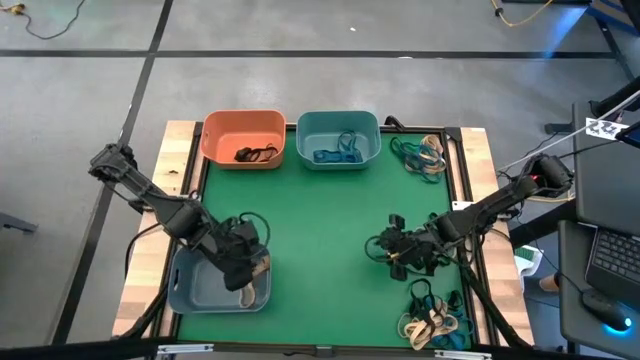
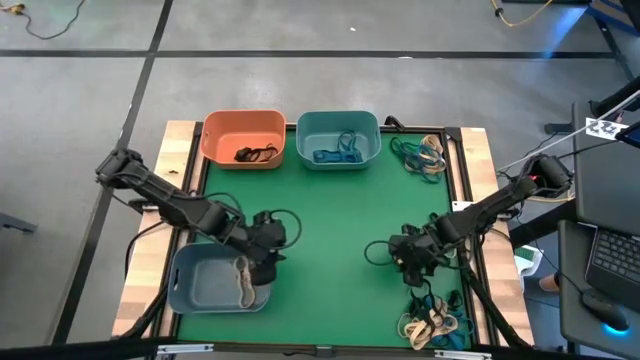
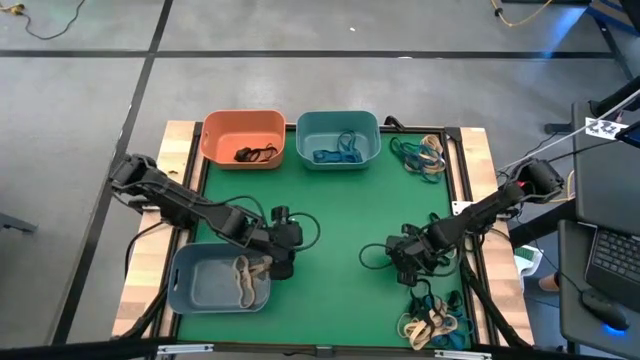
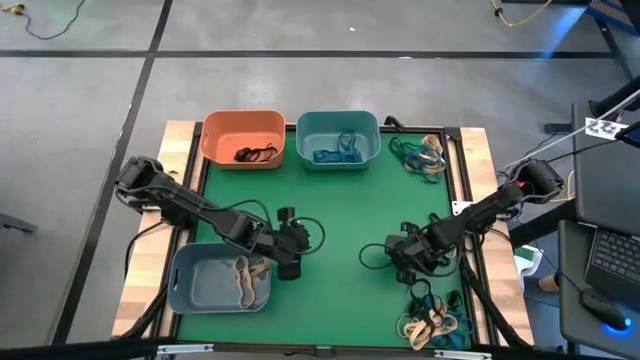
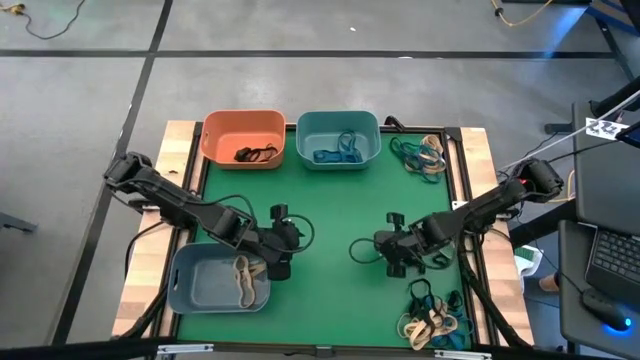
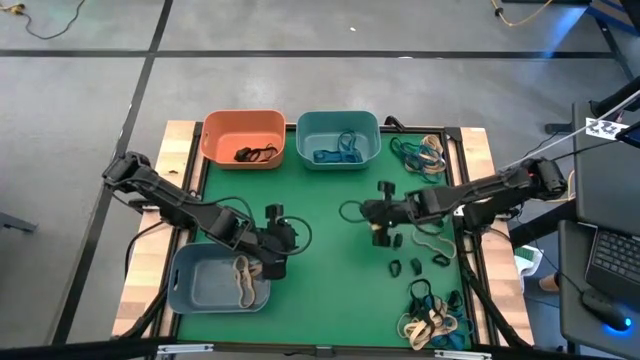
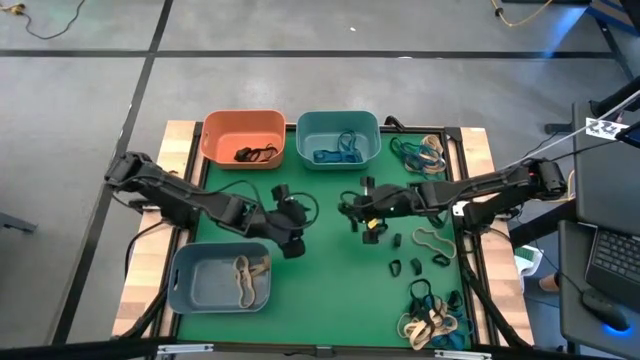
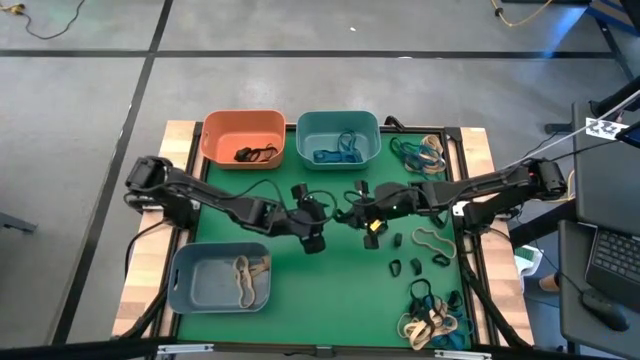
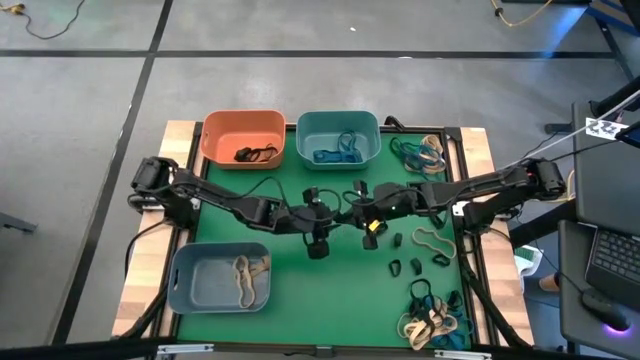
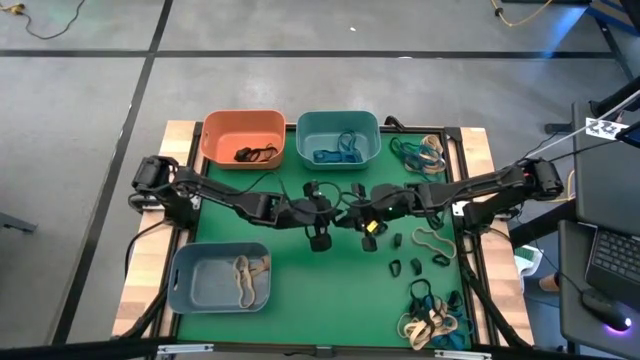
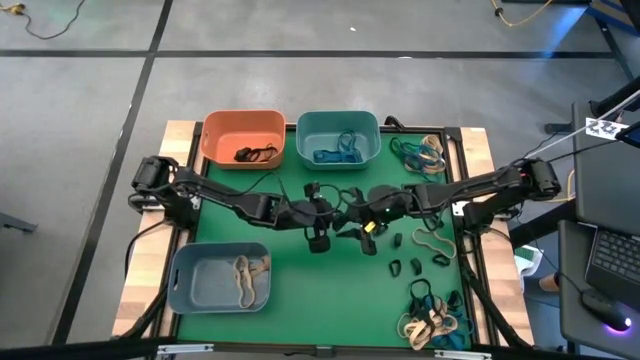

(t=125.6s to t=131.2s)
Task: Sort rubber bands into baskets
Put the black rubber band into the orange bin

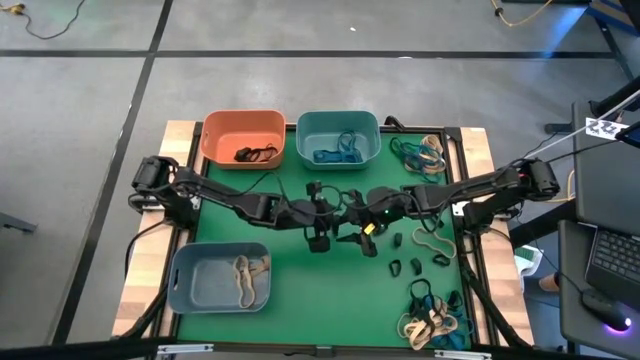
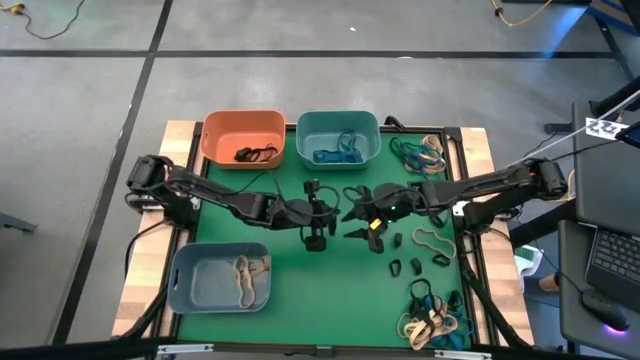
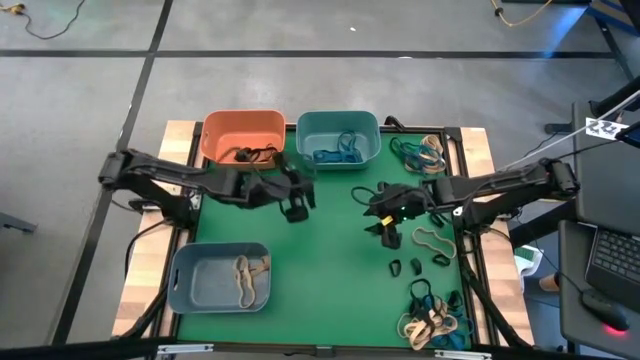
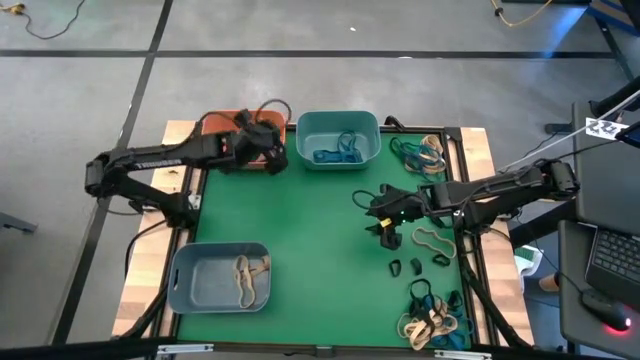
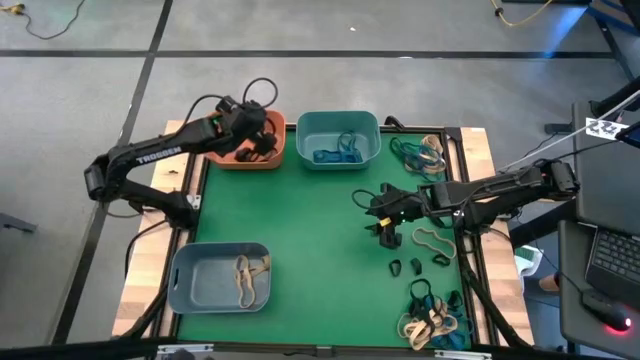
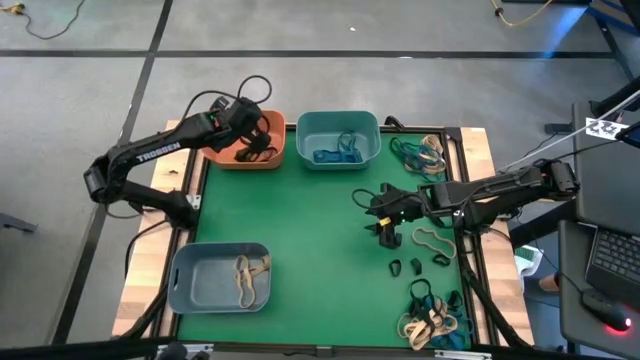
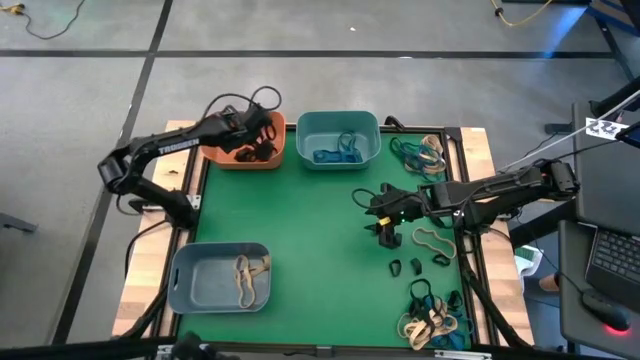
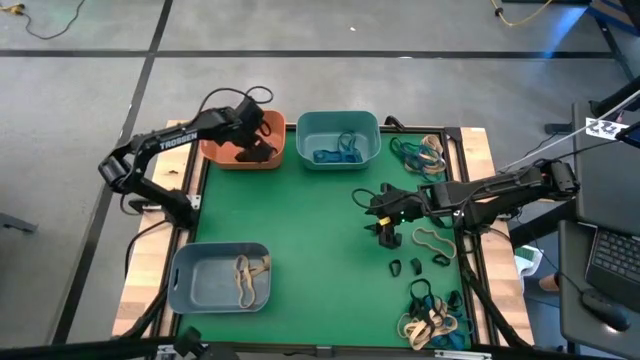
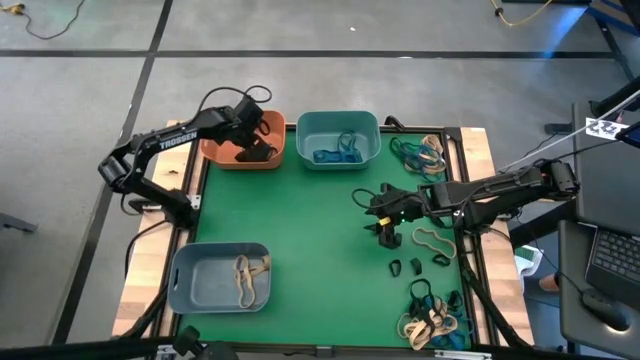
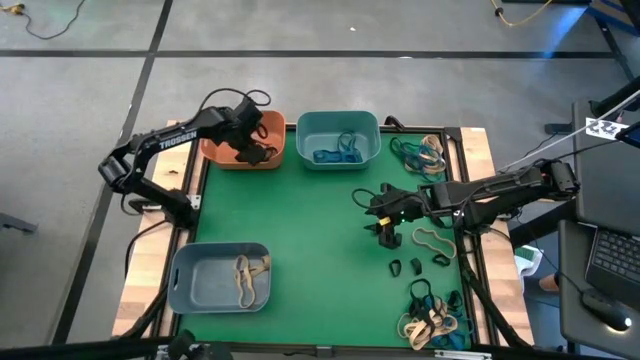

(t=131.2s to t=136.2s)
Put the black rubber band into the orange bin

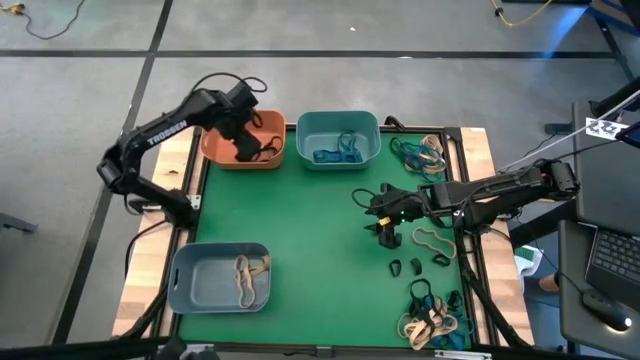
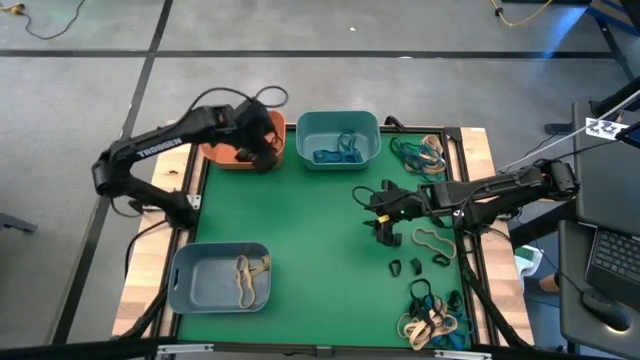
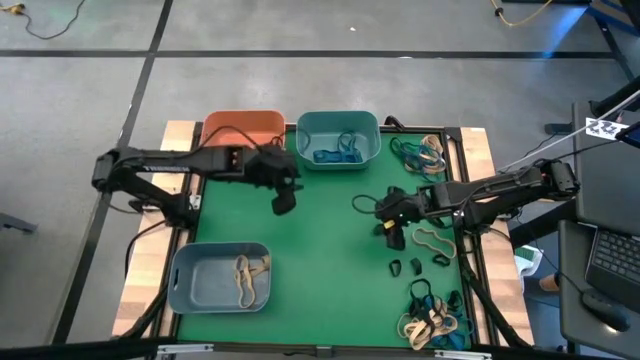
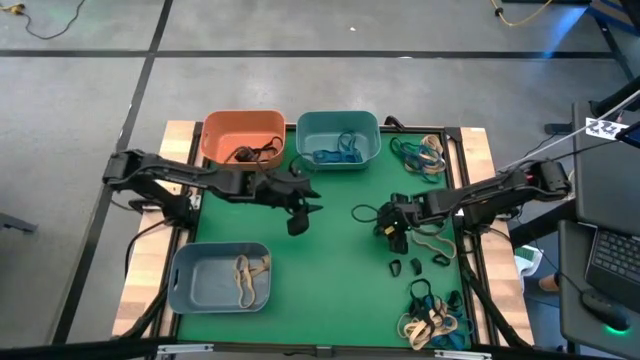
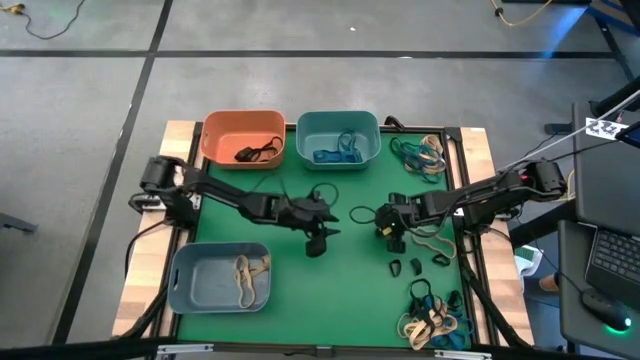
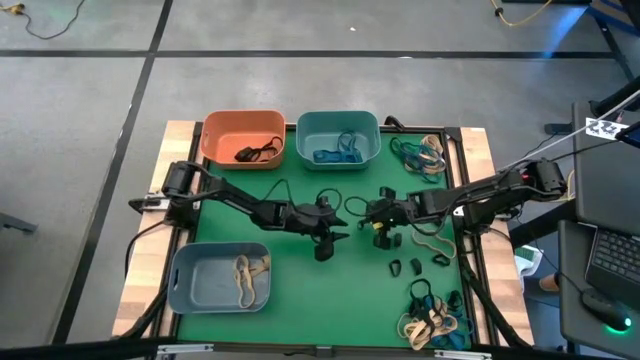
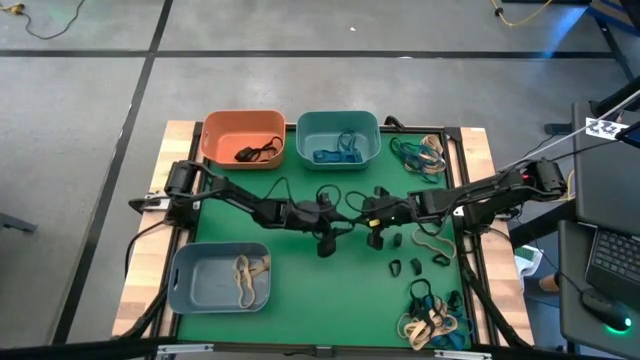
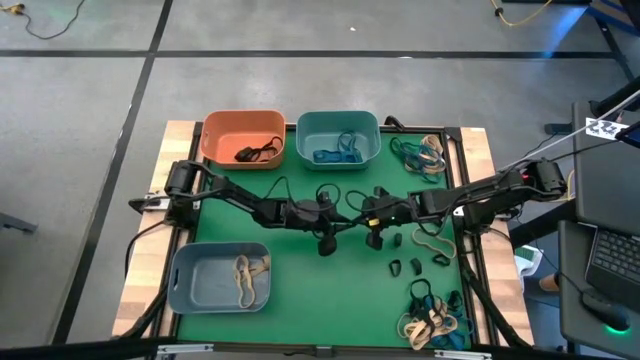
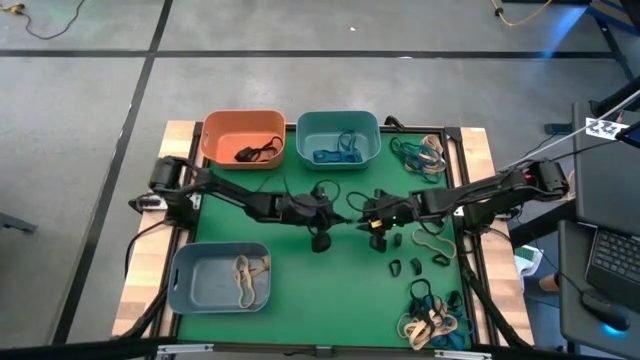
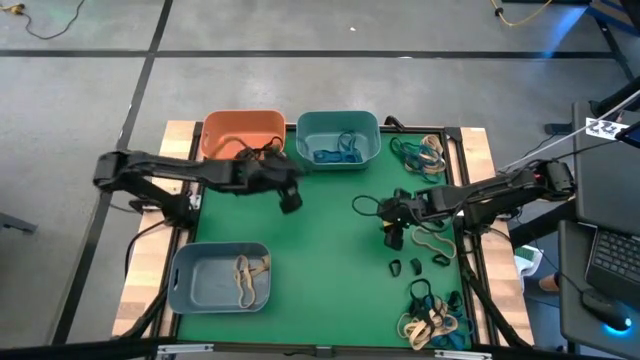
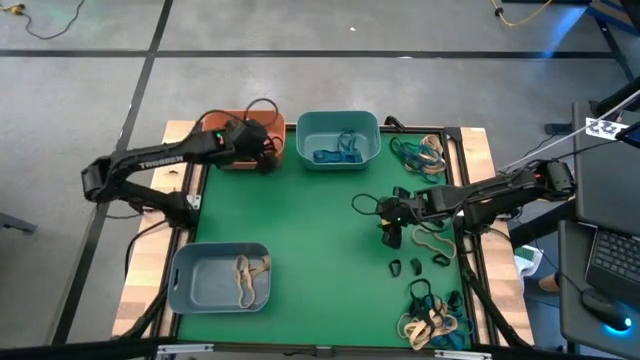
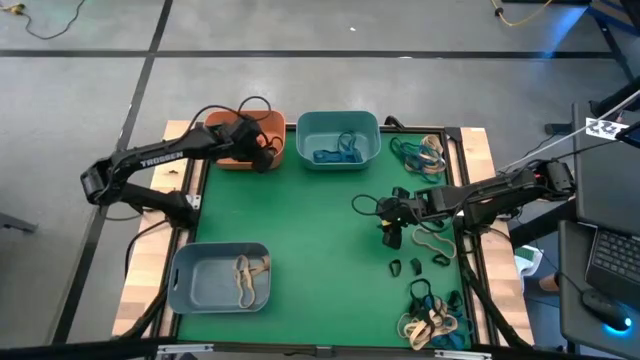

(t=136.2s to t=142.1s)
Put the small black rubber band into the orange bin

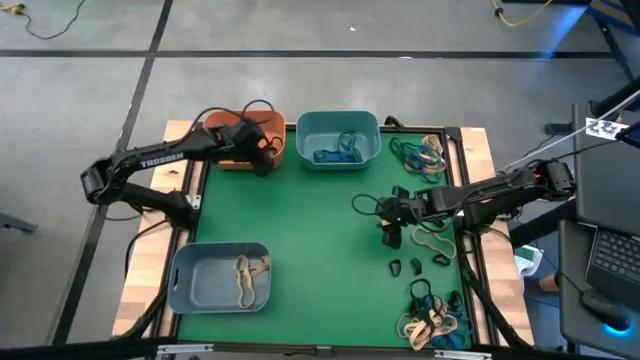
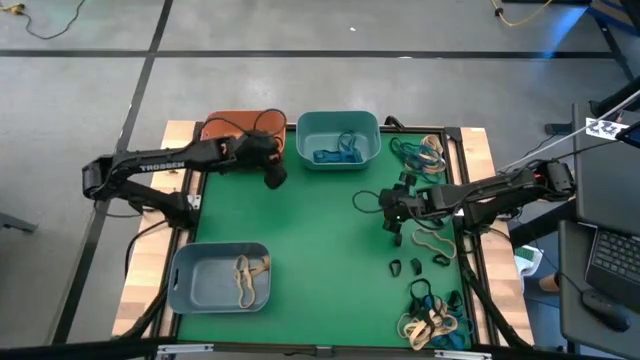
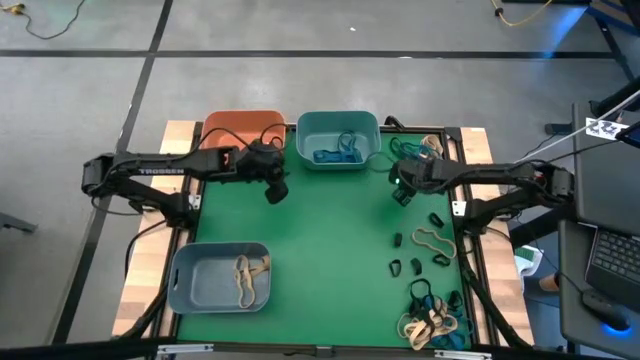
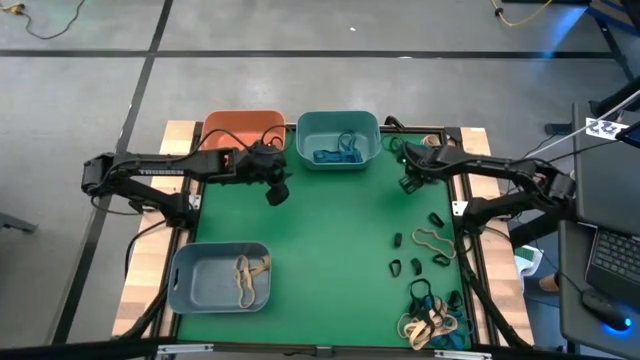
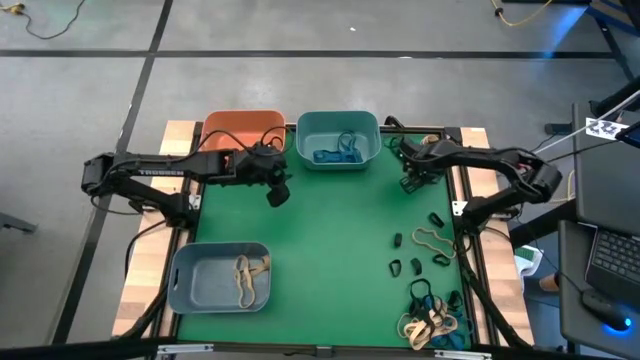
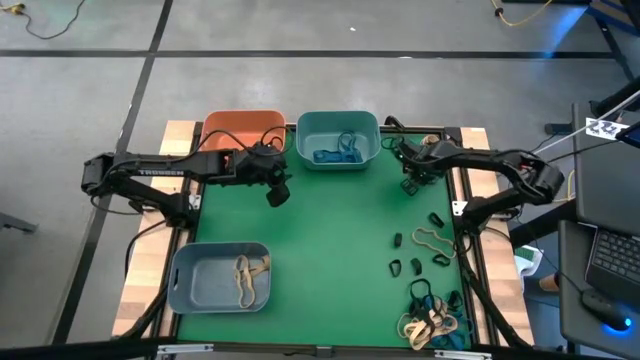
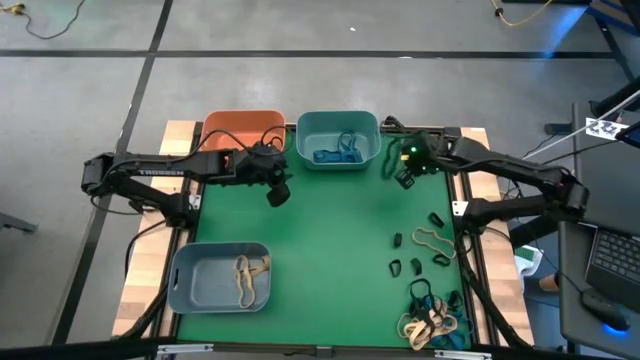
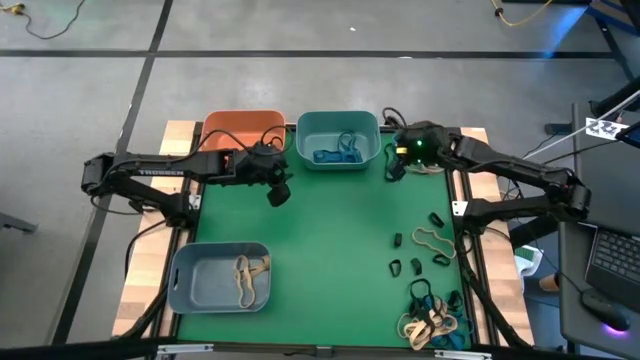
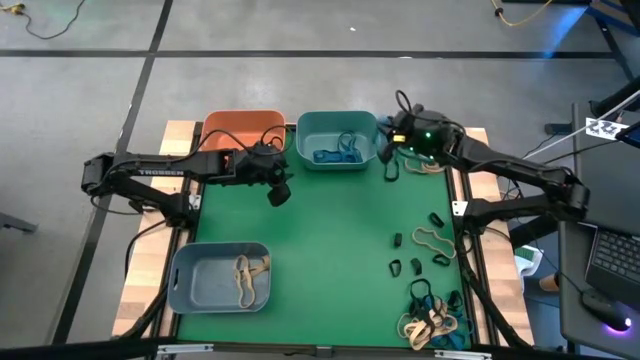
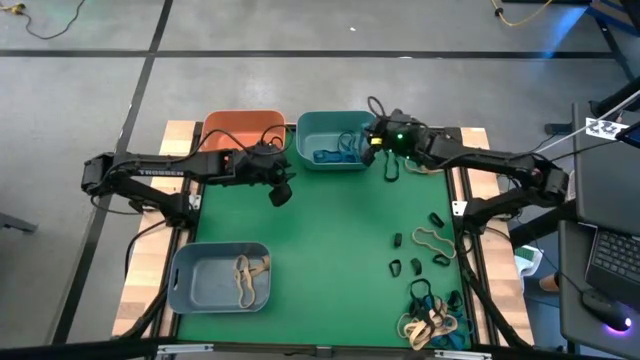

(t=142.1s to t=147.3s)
Put the blue rubber band into the green bin
